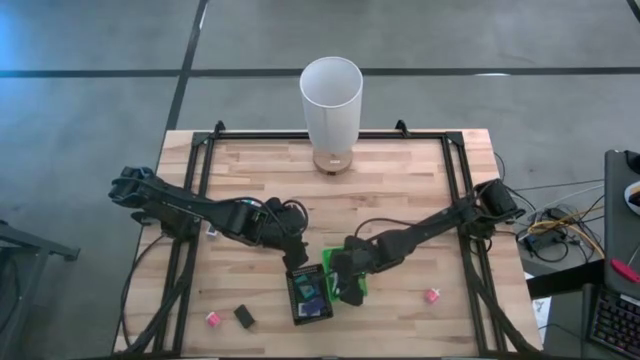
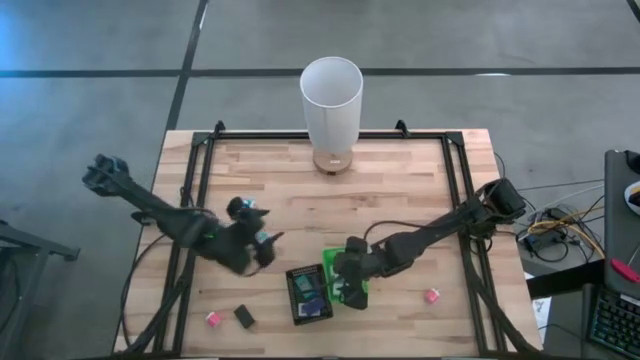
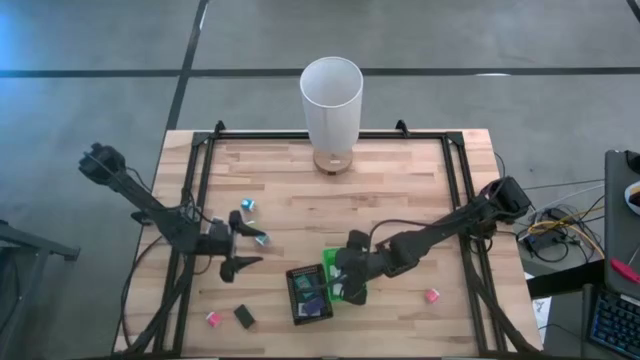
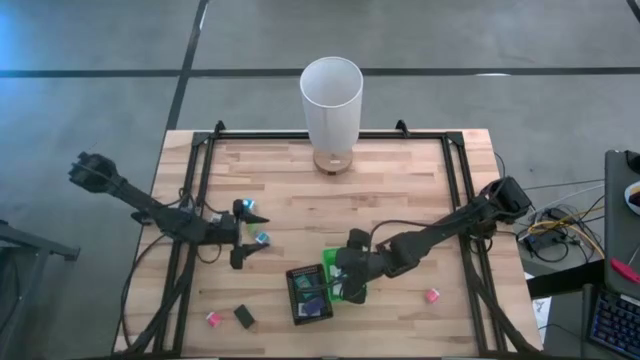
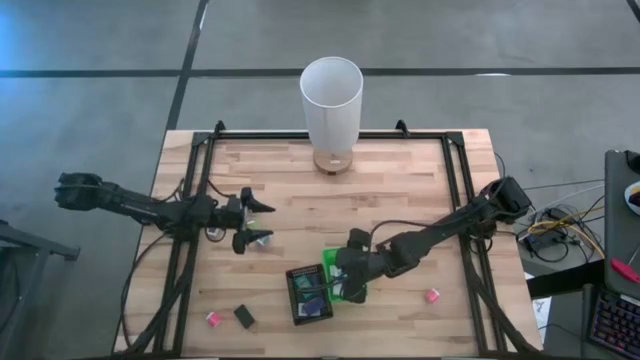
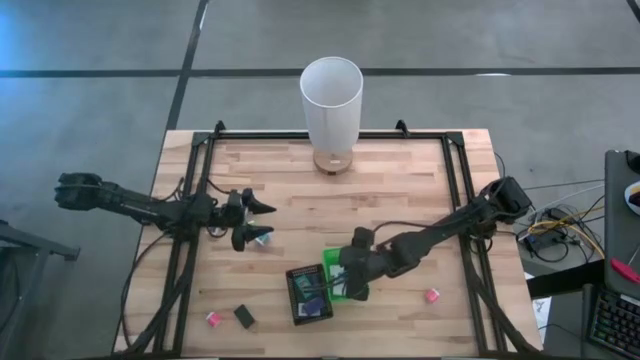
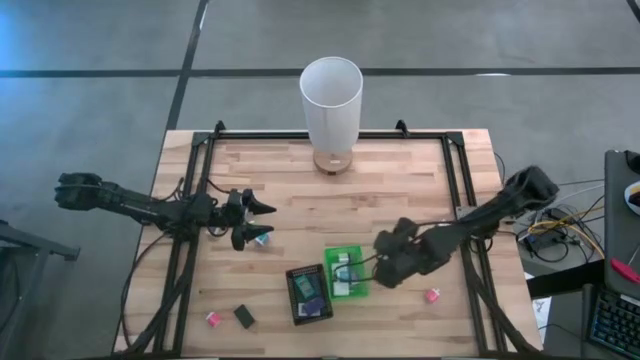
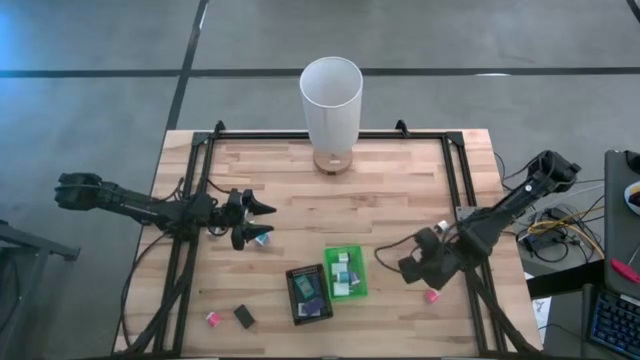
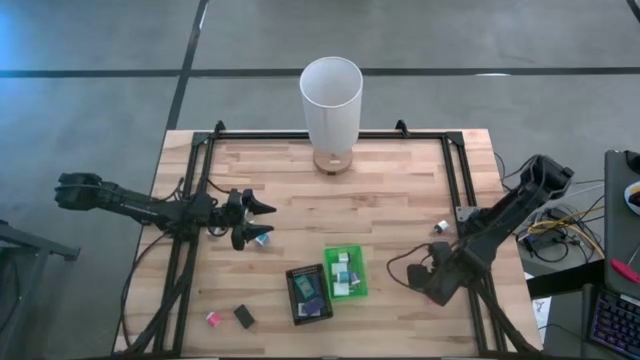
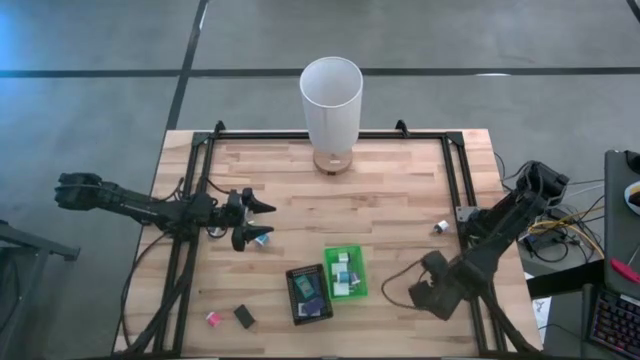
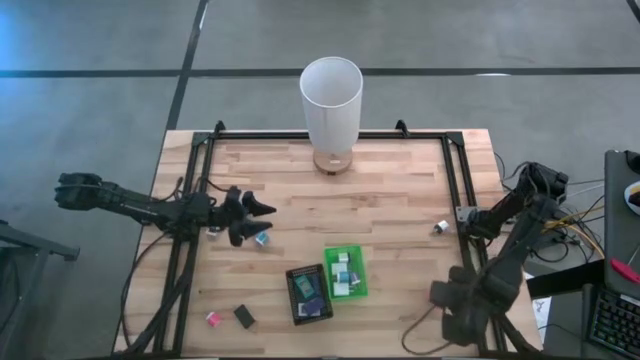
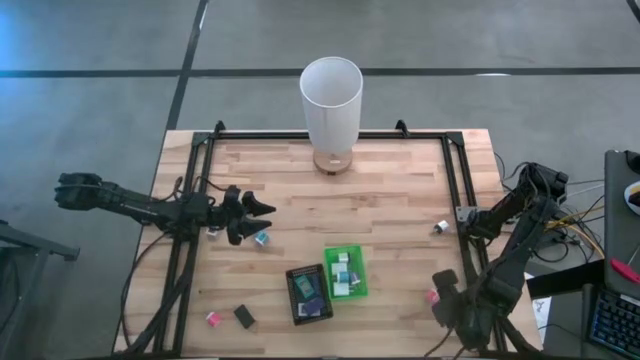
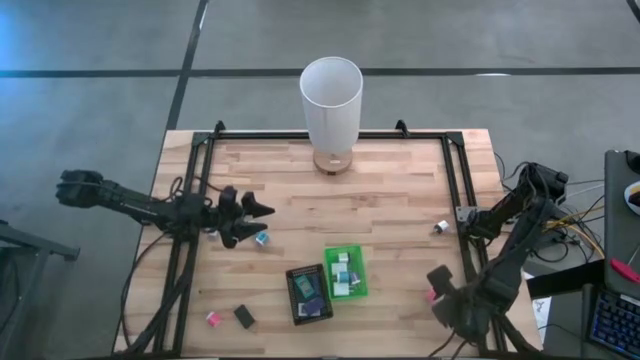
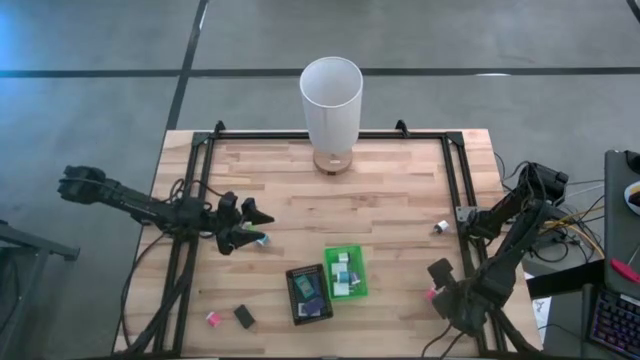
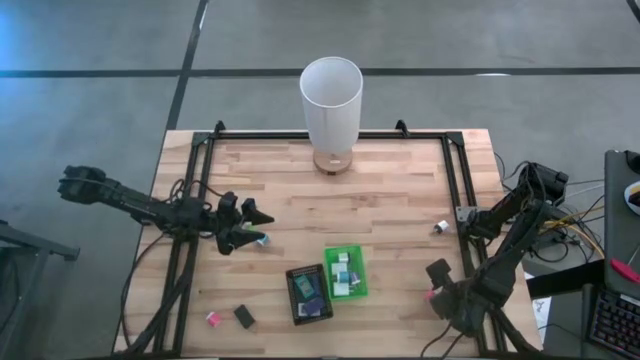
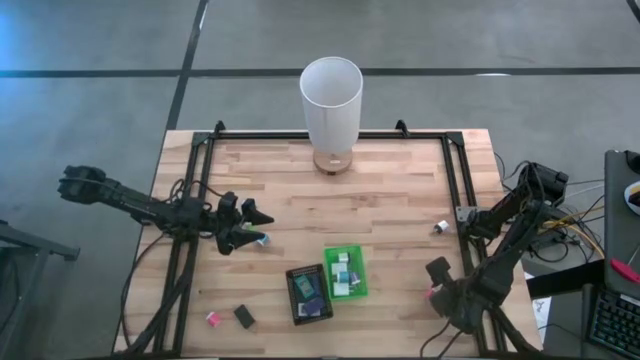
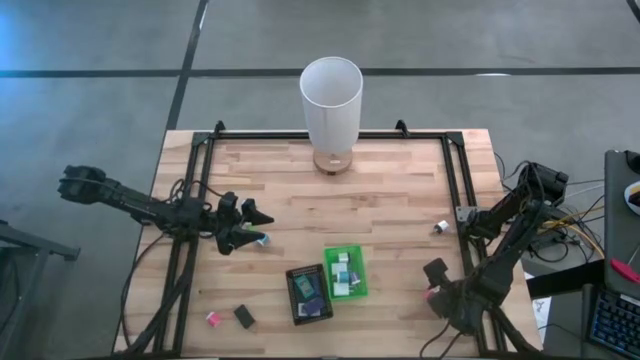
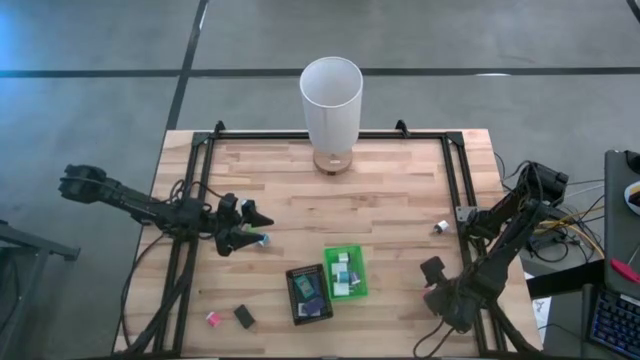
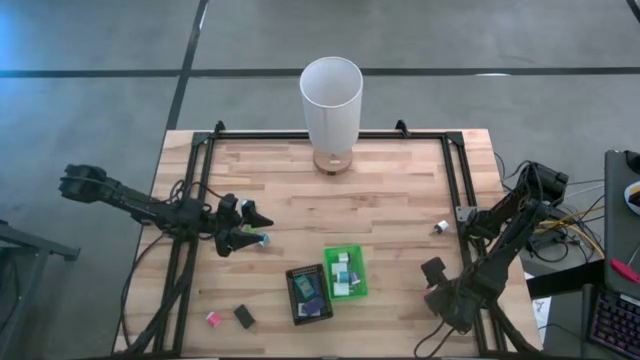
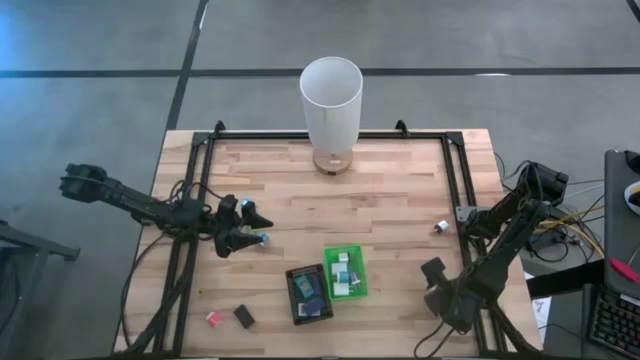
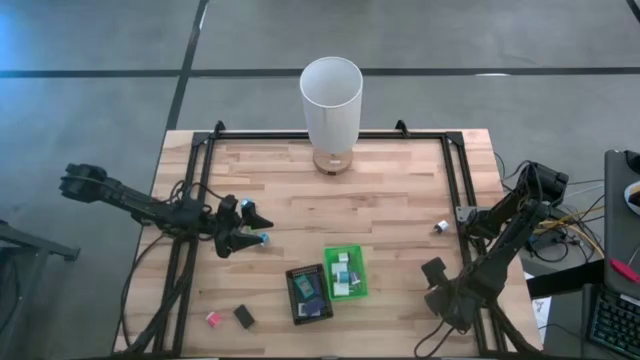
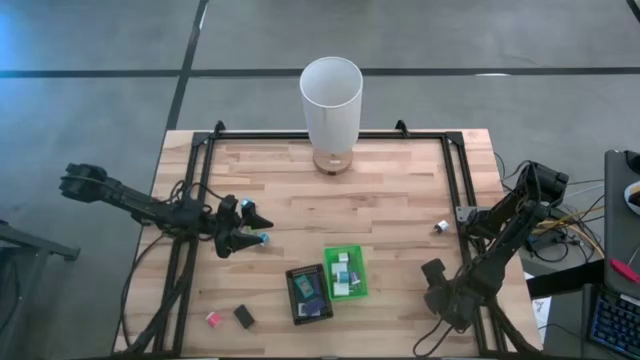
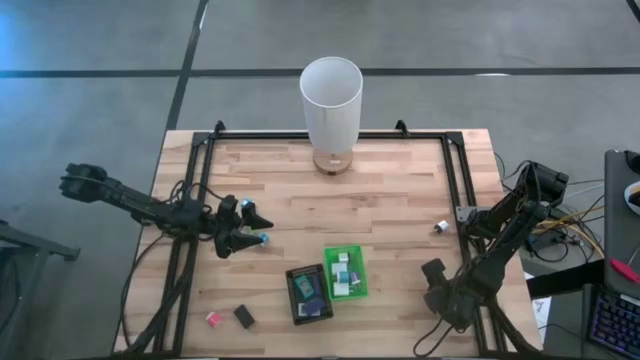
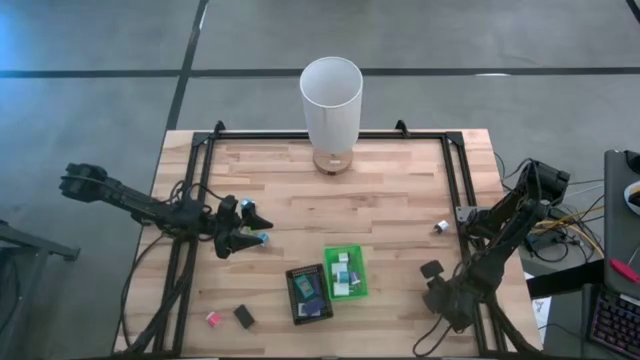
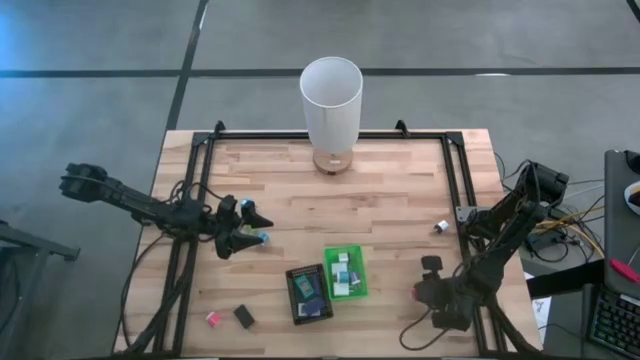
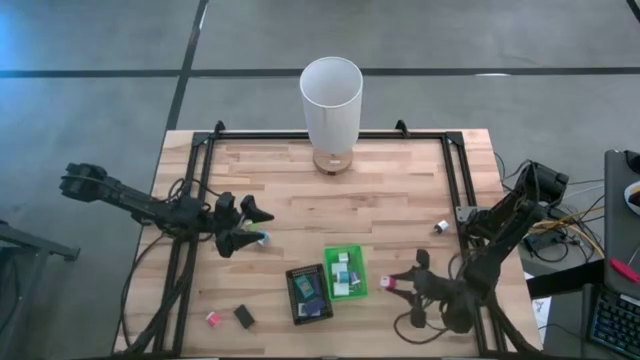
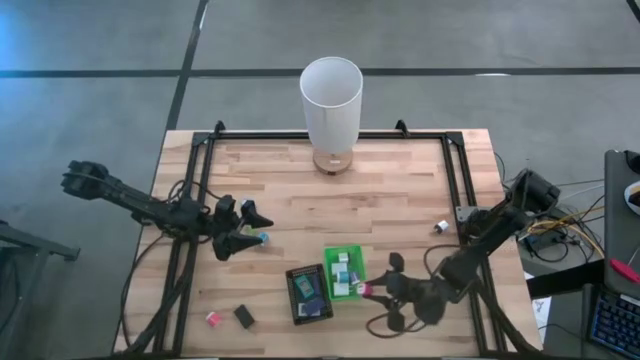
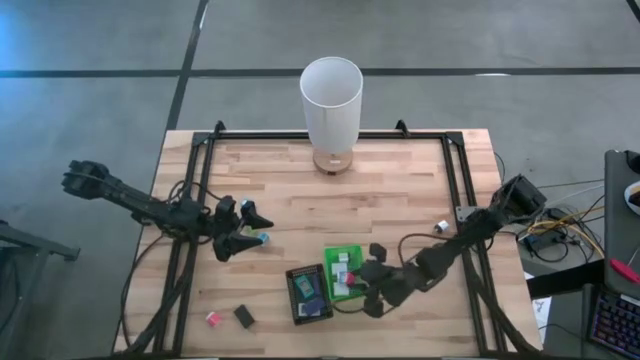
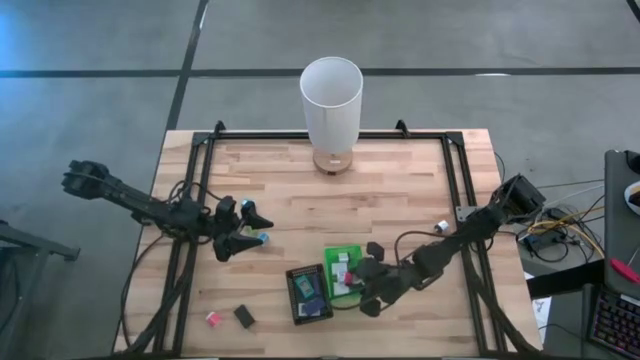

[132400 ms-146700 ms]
Task: Pick & Place Office items
Put the right pink charger adapter into the green bin

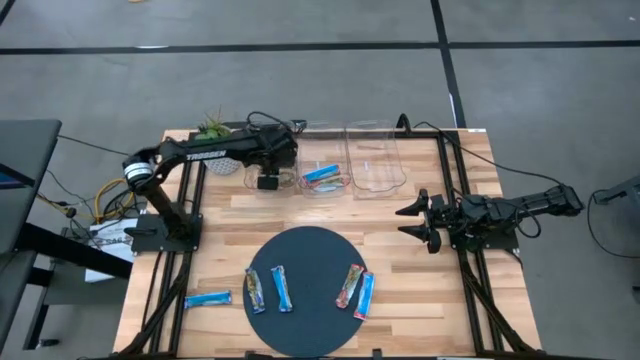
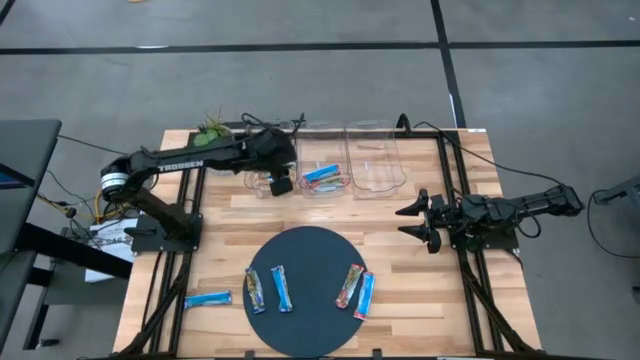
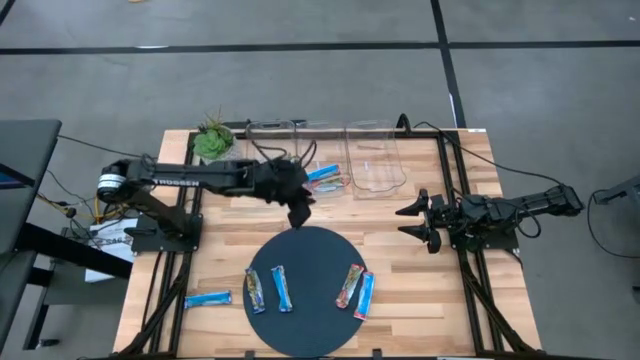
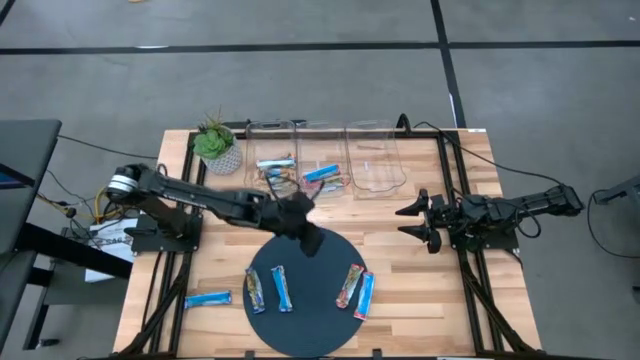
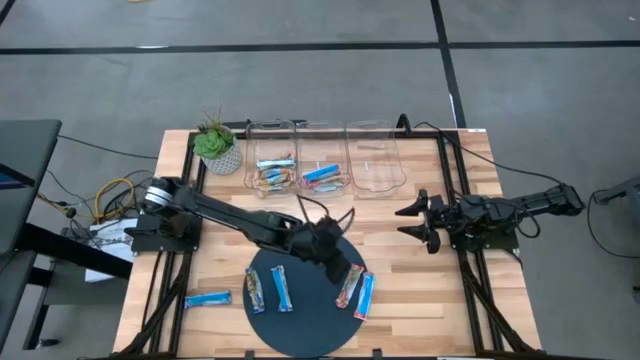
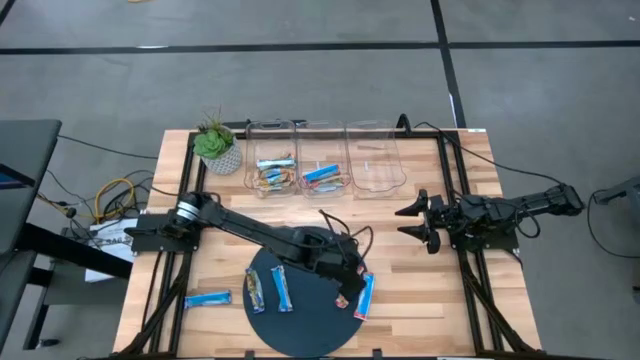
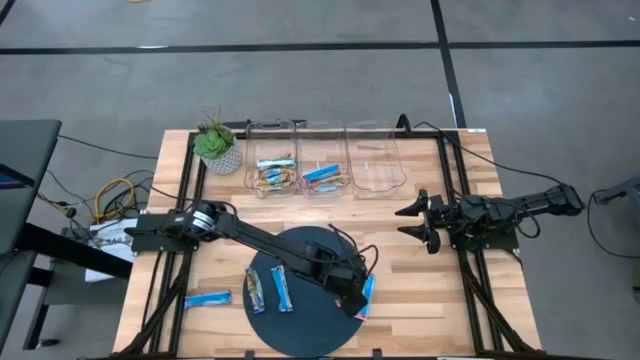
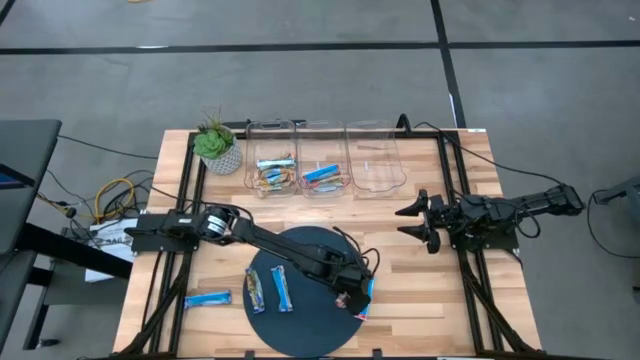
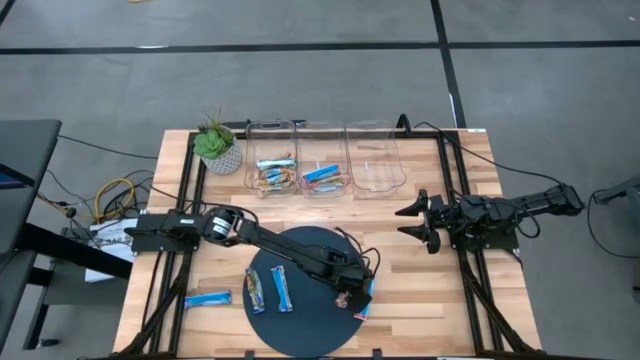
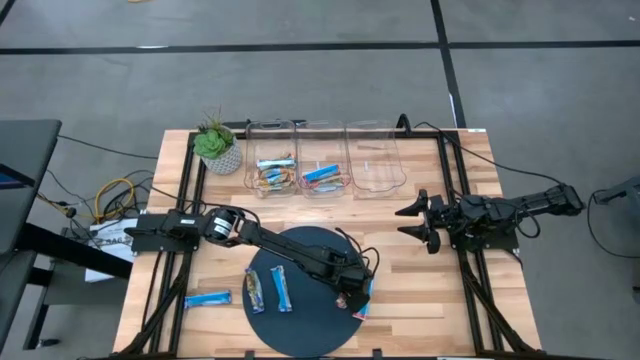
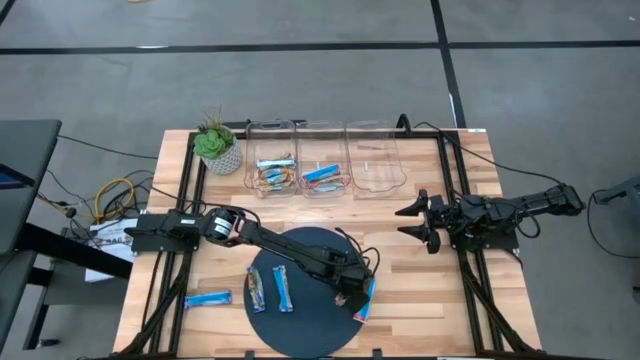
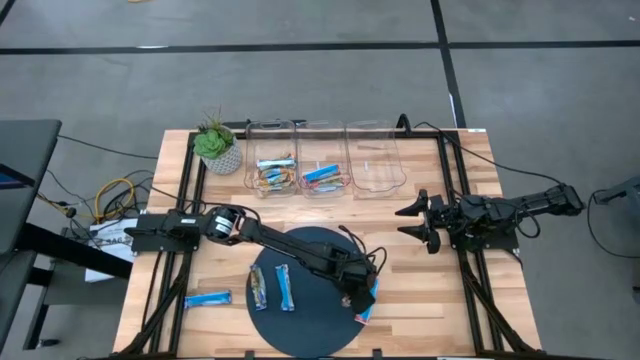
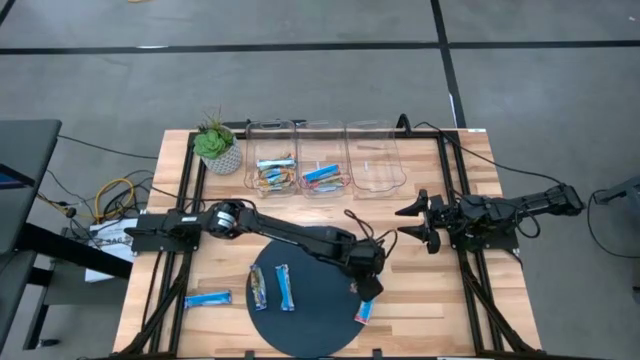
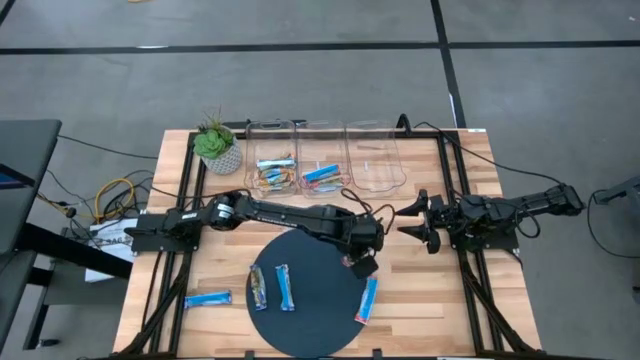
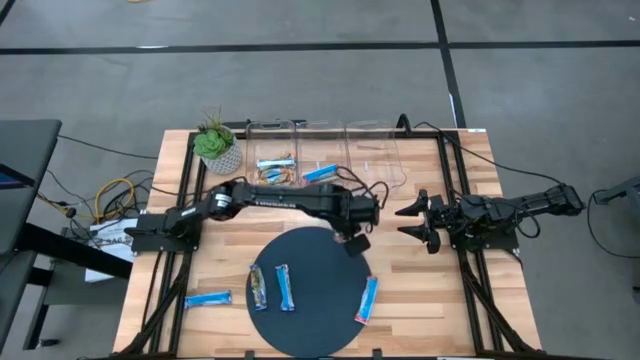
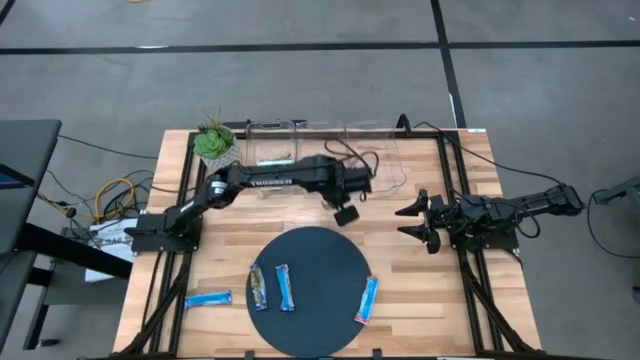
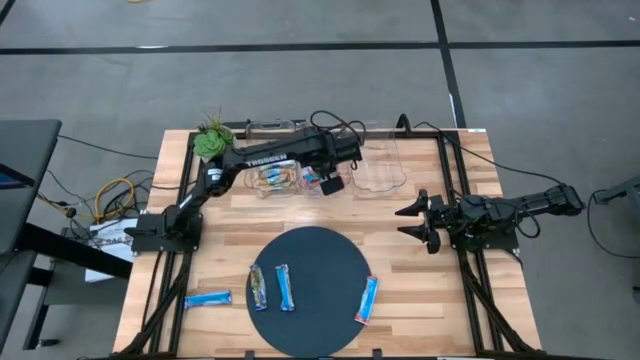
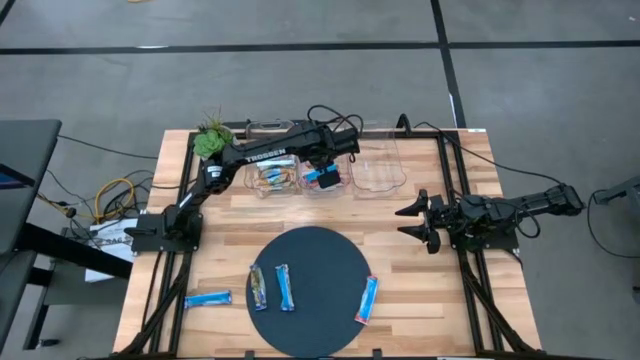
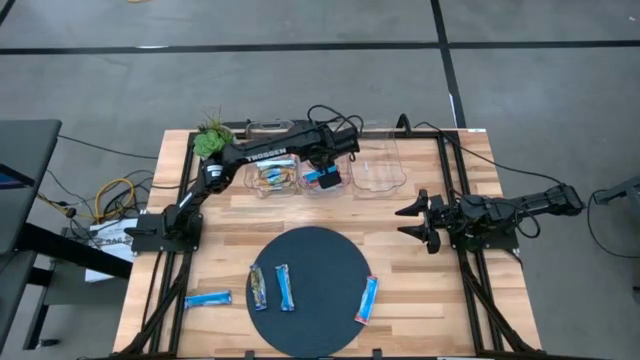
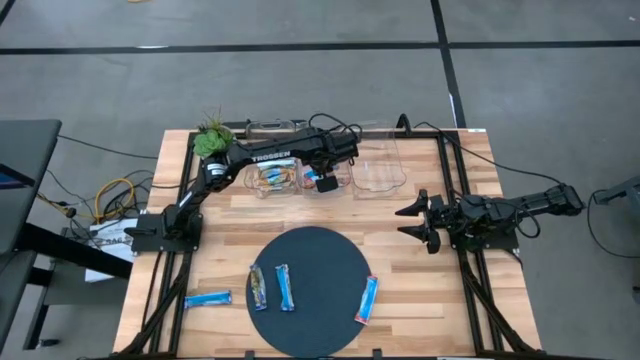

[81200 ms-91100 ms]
Task: Pick and place Granola Bars by type
Put the red bar into the center transparent bin
